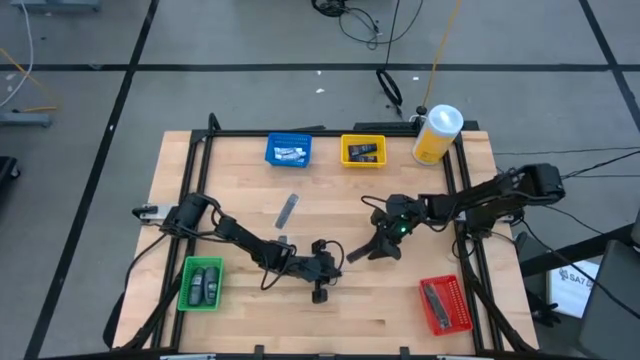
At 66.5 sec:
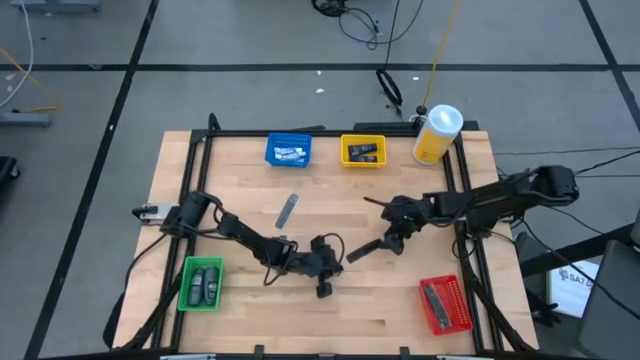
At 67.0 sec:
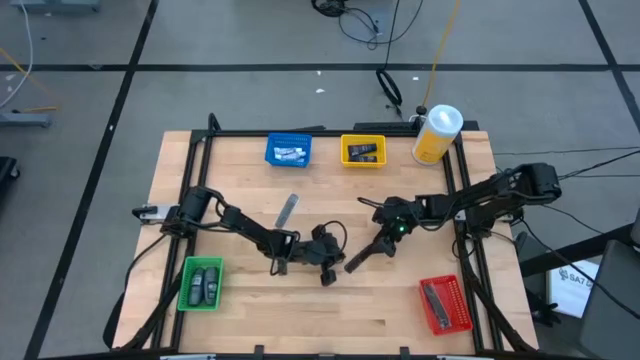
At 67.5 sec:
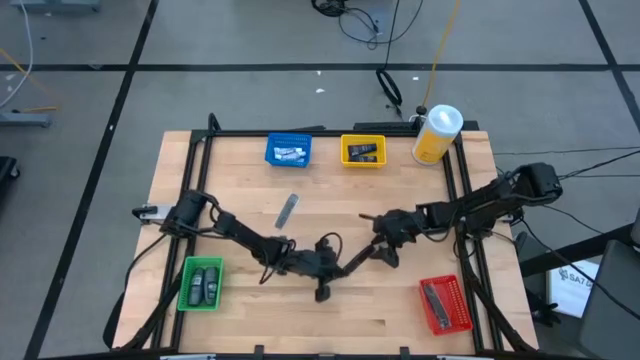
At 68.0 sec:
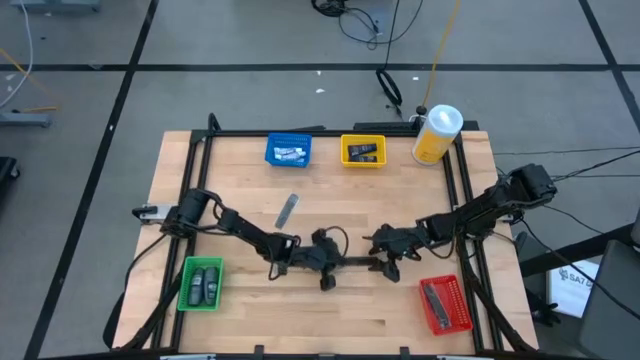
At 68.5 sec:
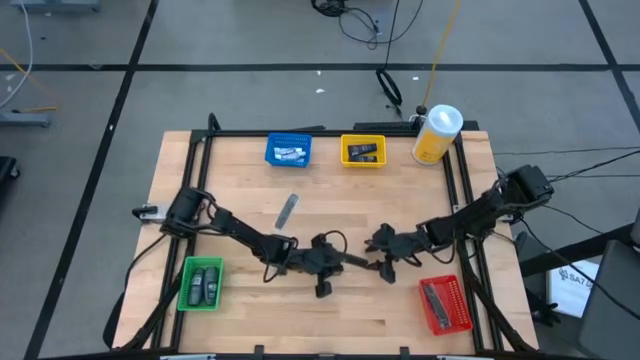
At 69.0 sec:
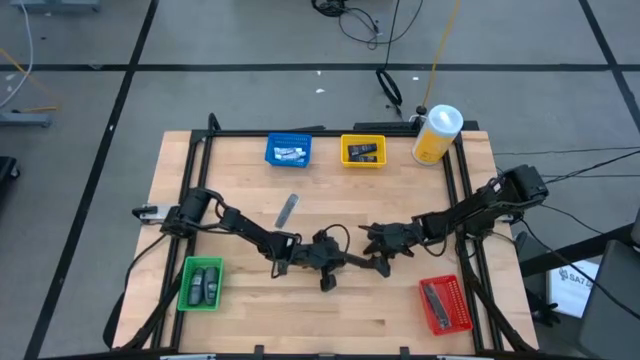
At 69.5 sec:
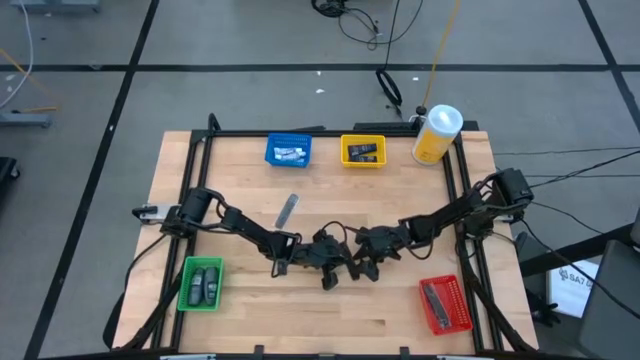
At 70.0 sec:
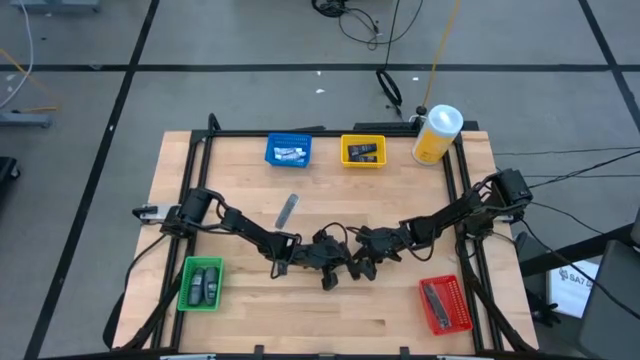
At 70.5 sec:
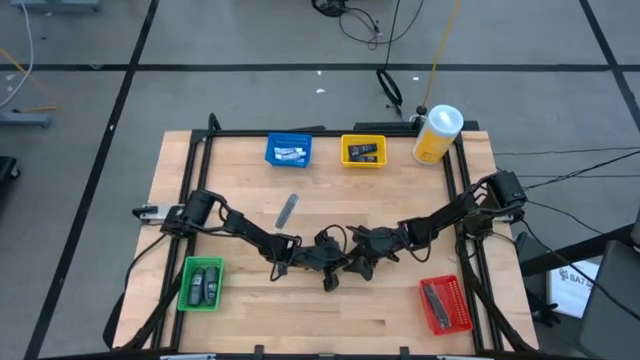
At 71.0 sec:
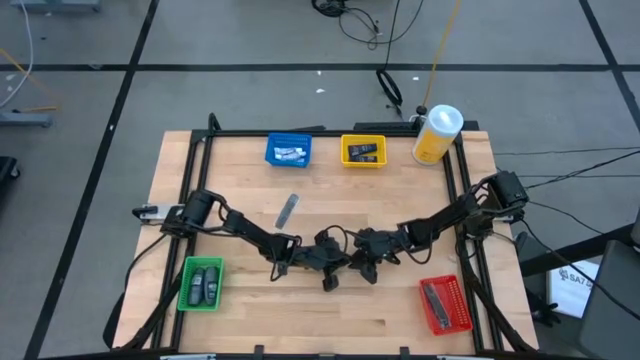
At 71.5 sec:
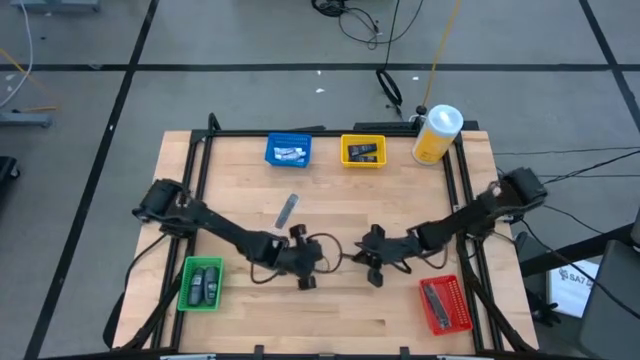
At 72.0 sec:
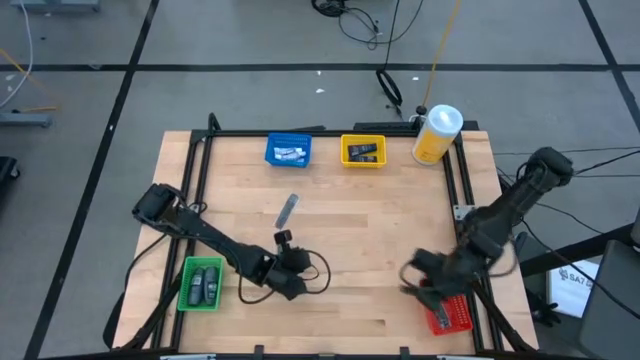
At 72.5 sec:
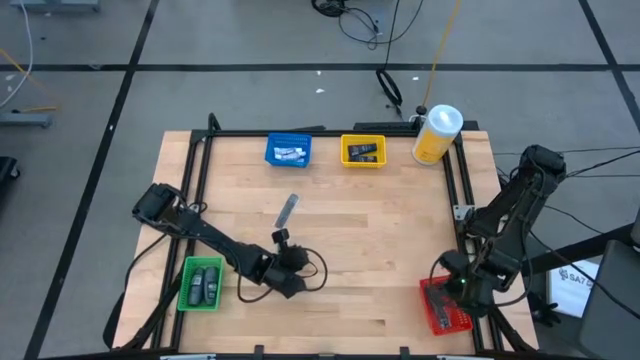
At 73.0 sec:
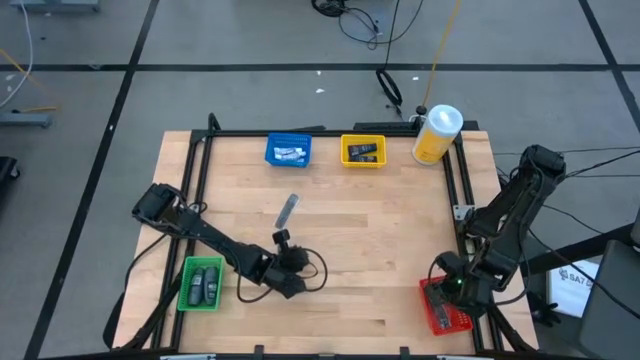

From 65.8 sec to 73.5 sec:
Task: Pick & Place Travel size toiletries
Put the black hair comb into the red bin

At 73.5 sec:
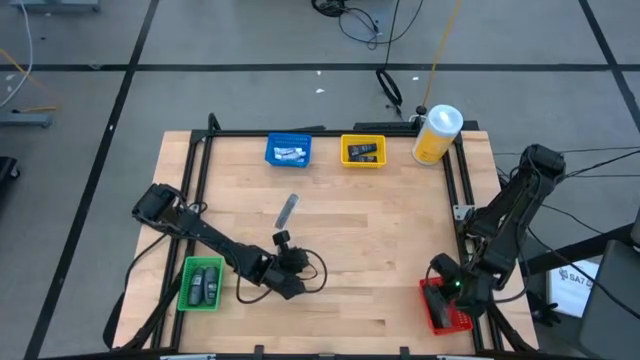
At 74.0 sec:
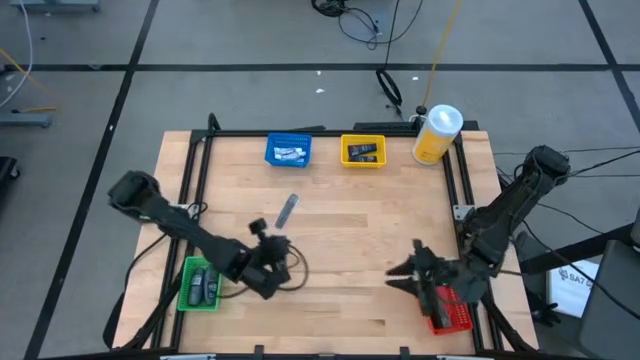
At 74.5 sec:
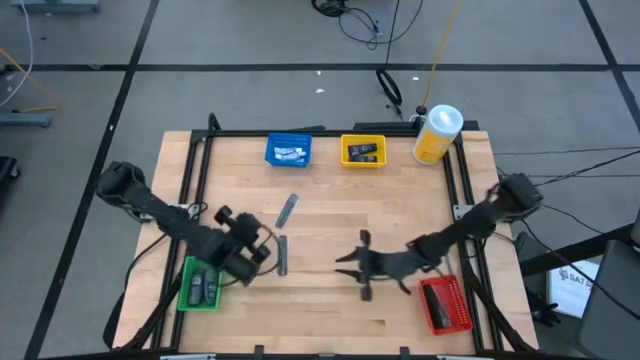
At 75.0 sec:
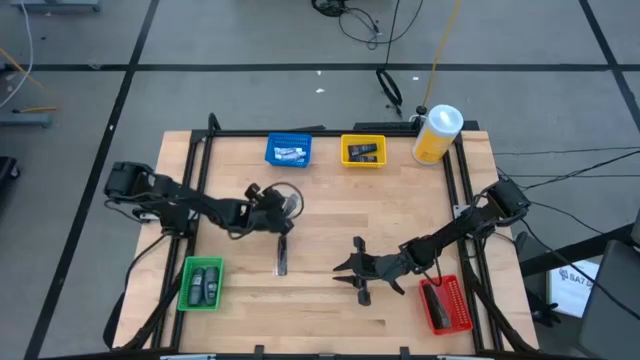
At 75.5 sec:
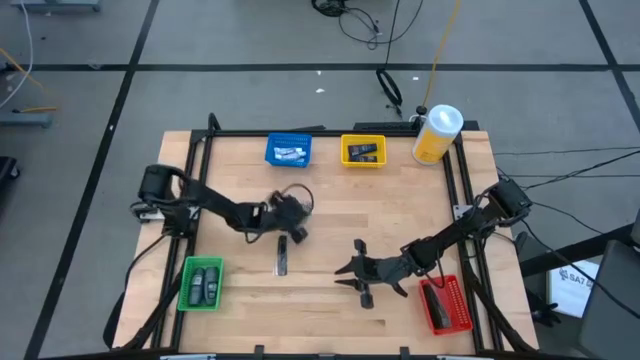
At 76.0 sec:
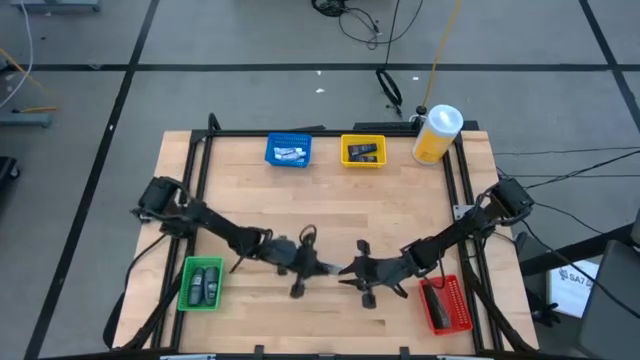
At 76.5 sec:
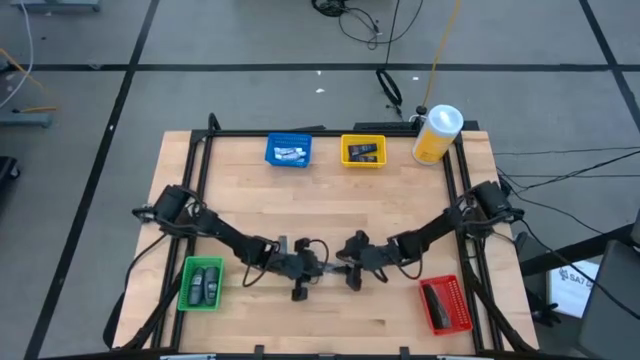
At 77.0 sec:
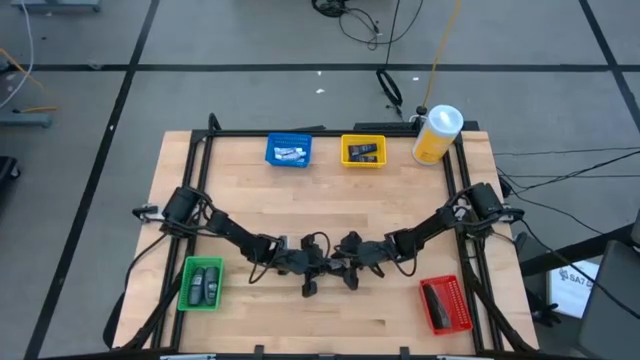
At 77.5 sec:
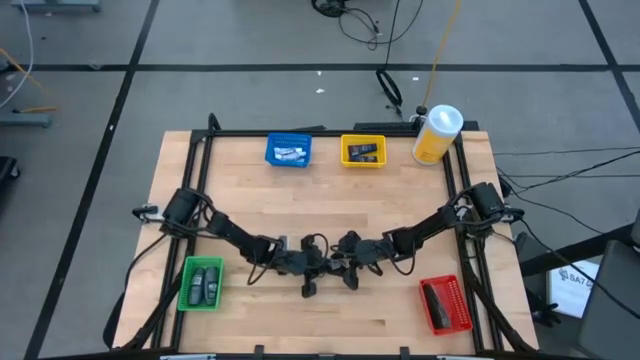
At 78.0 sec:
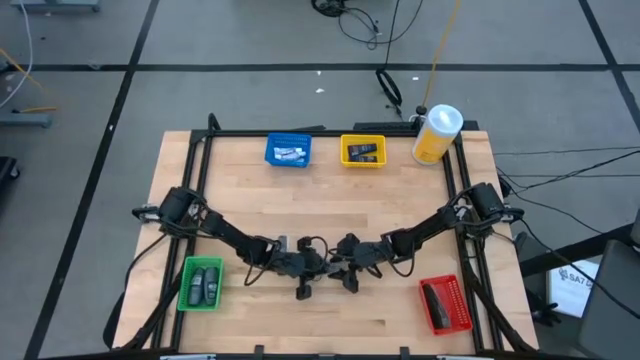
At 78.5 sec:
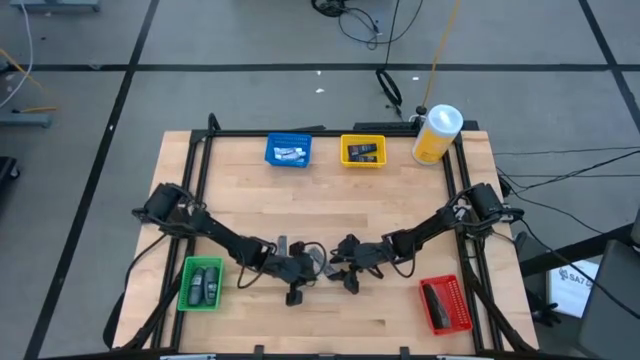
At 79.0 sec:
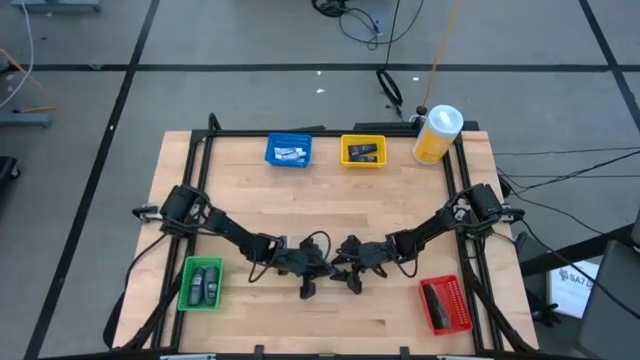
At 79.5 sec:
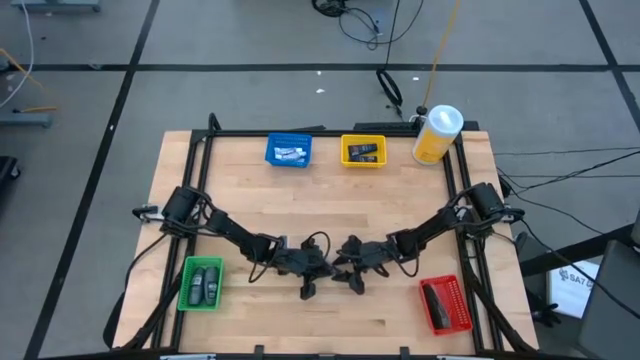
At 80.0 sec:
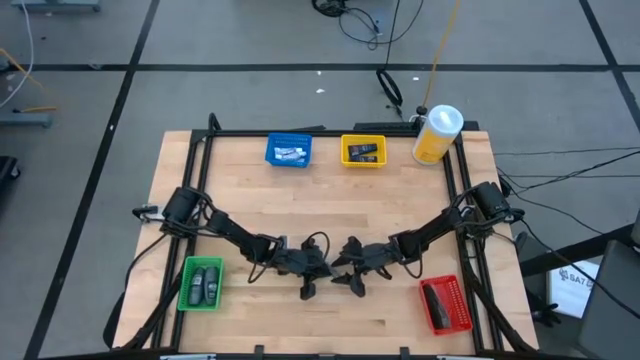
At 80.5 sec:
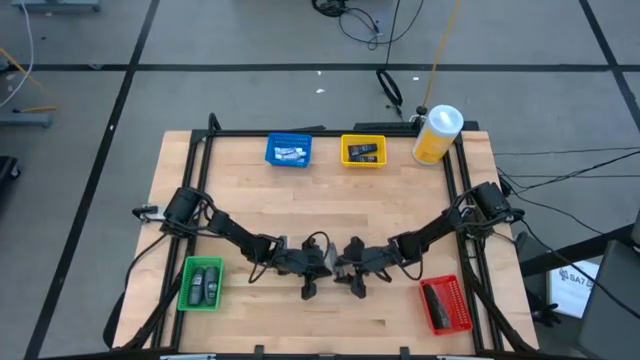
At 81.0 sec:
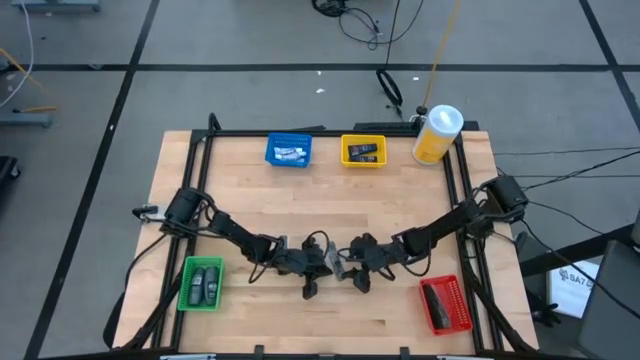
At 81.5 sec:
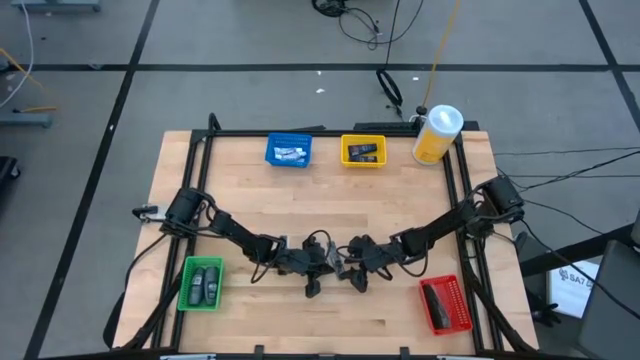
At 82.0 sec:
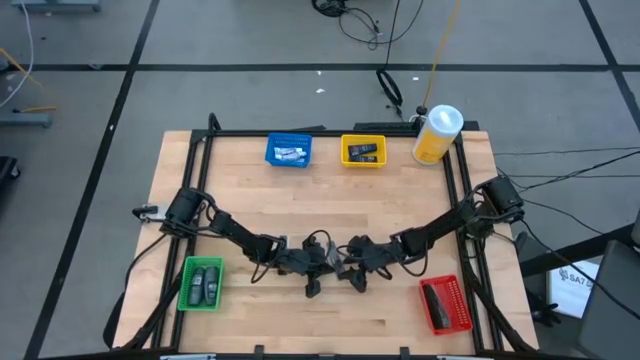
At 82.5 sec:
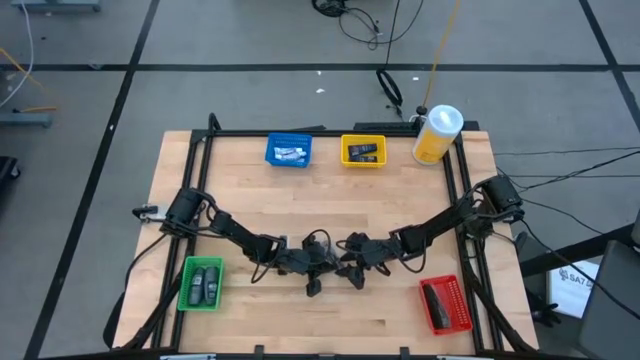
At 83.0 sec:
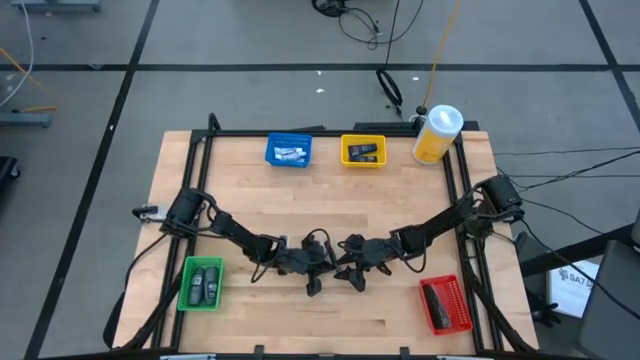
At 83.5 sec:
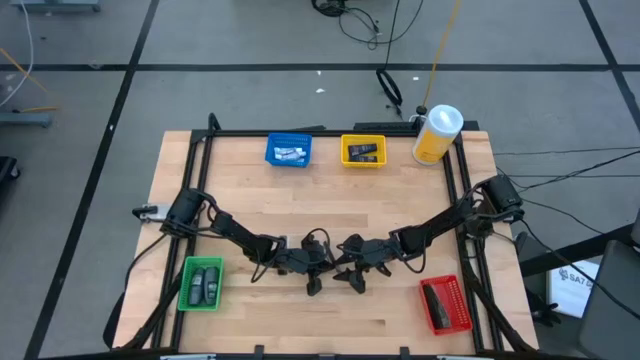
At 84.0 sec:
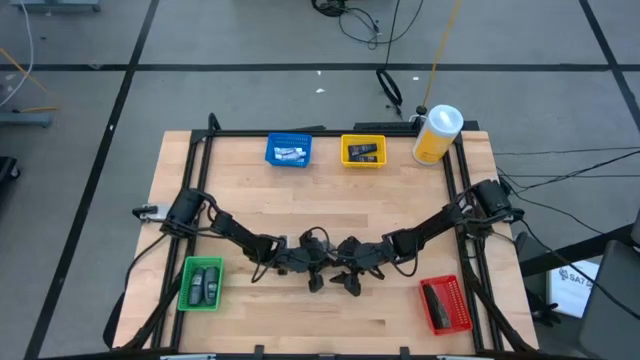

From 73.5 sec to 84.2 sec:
Put the black hair comb into the red bin

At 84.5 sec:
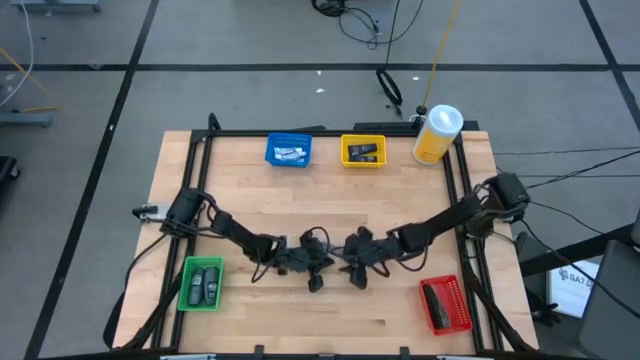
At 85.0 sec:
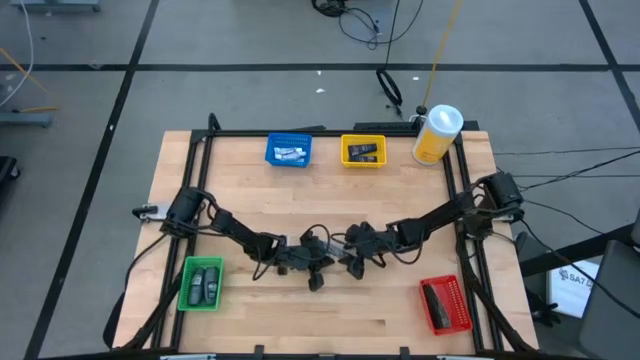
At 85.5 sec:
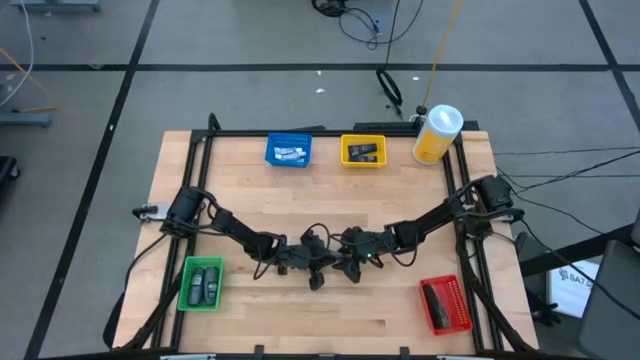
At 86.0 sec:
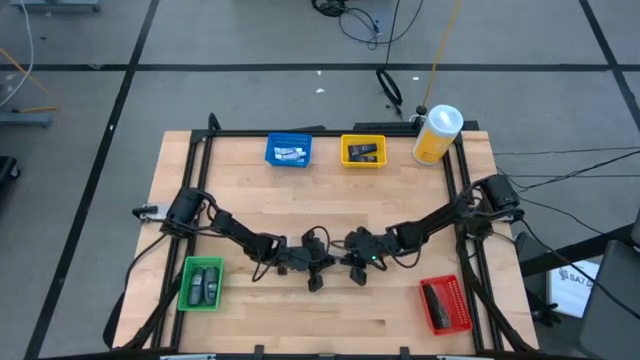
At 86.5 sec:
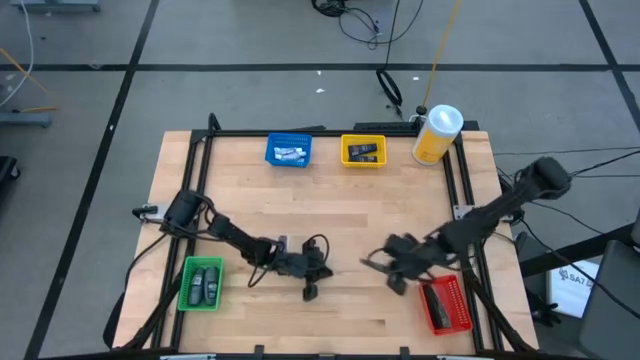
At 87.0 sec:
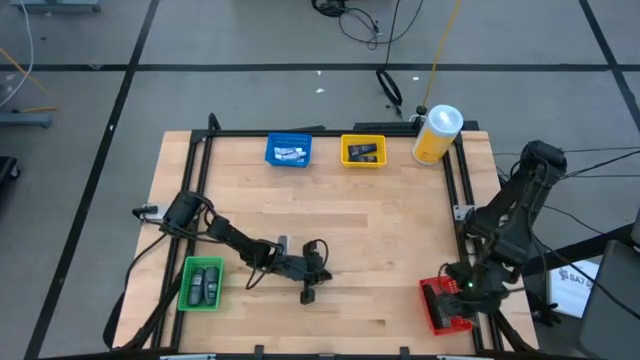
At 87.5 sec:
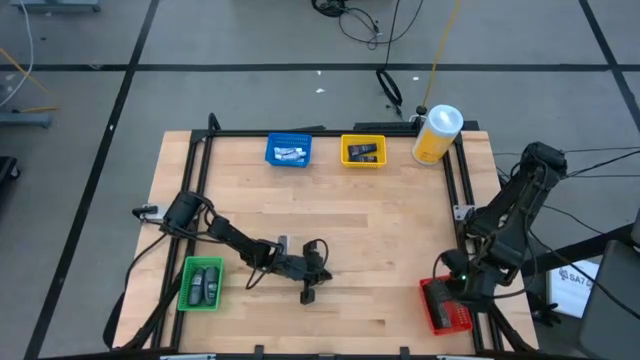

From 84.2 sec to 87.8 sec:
Put the black hair comb into the red bin
